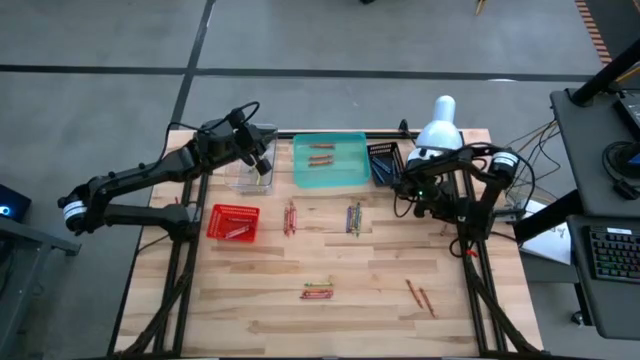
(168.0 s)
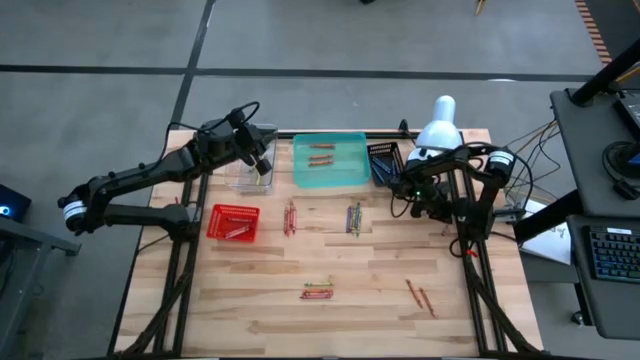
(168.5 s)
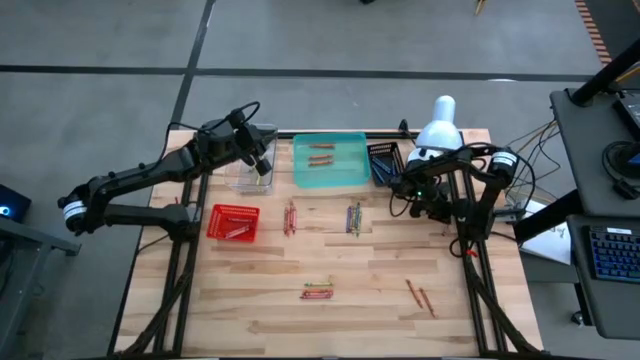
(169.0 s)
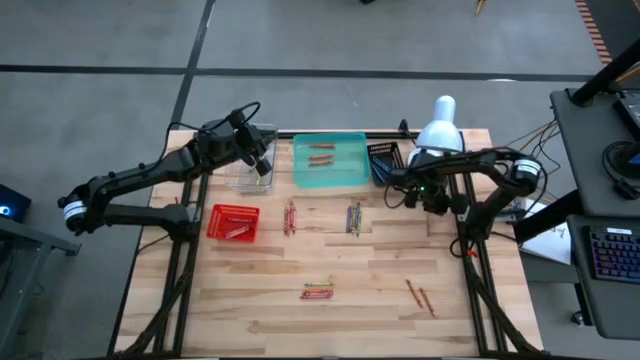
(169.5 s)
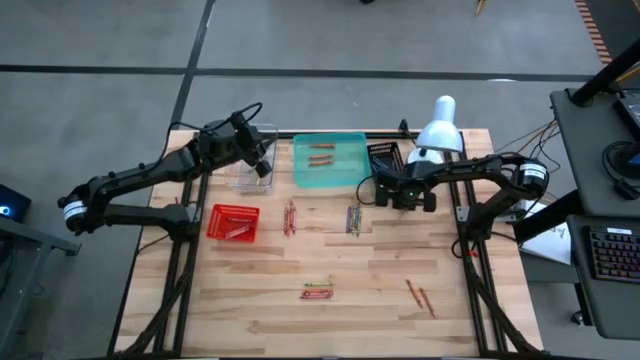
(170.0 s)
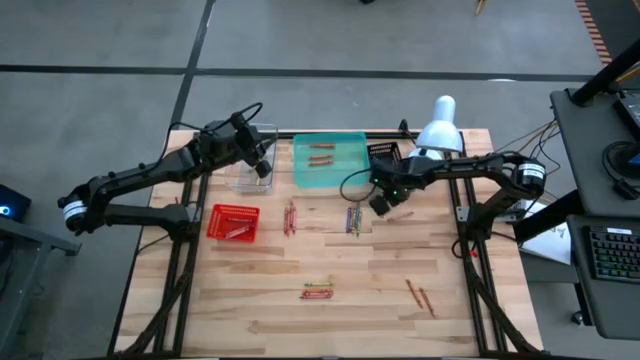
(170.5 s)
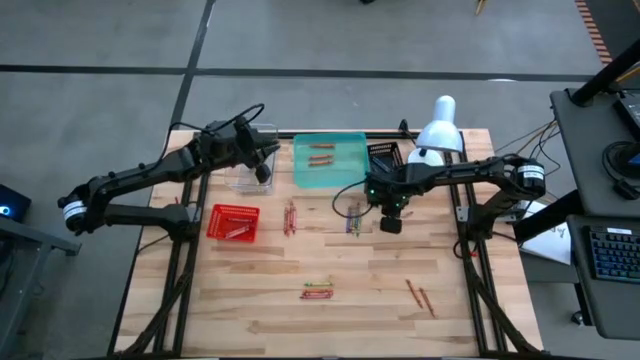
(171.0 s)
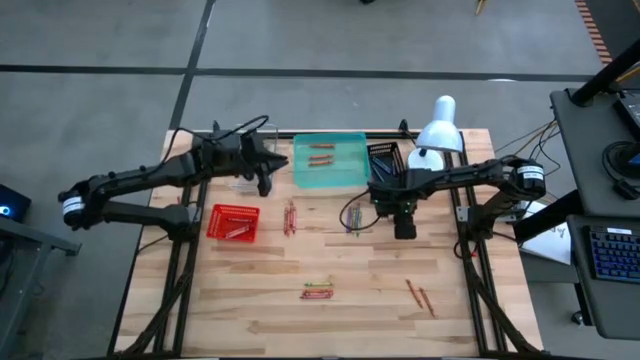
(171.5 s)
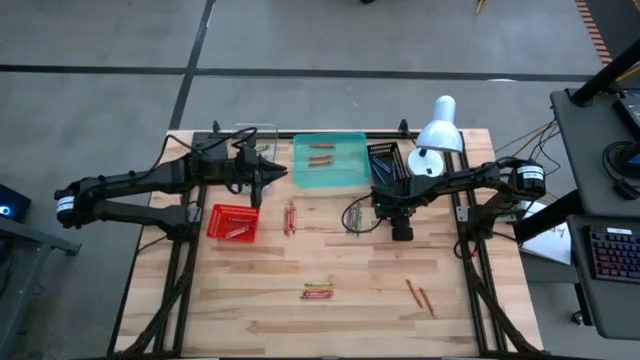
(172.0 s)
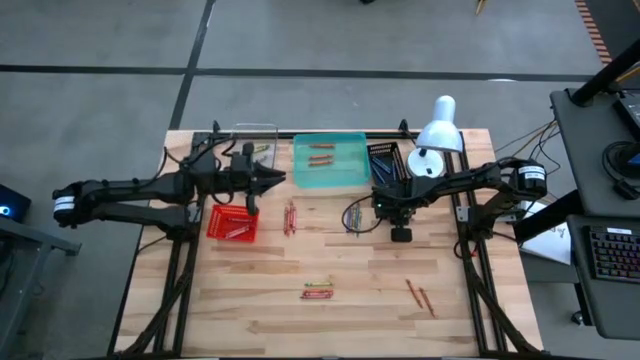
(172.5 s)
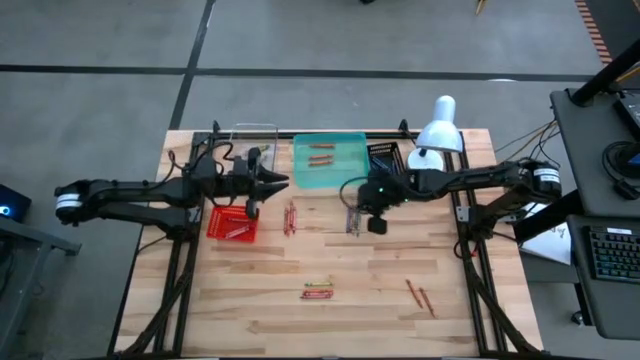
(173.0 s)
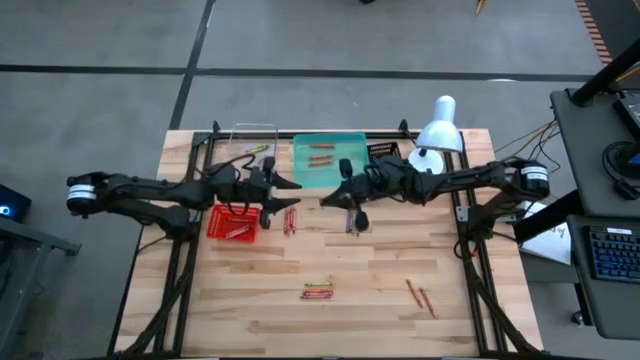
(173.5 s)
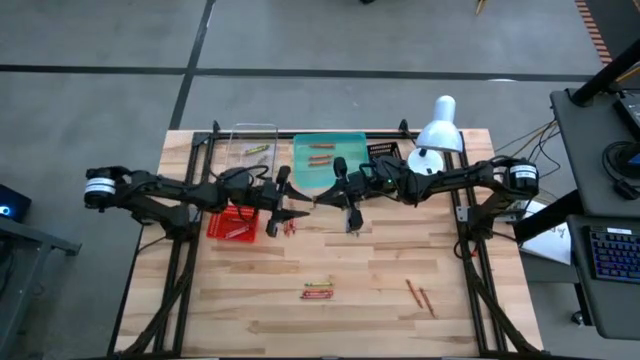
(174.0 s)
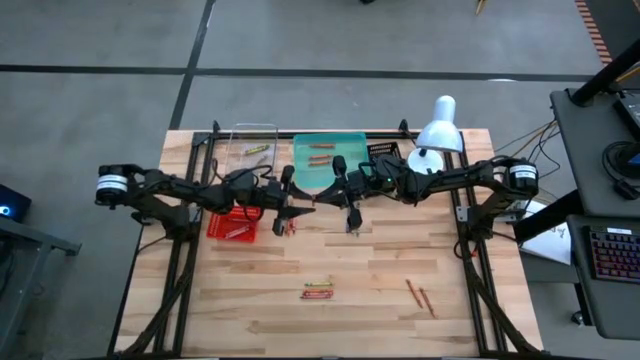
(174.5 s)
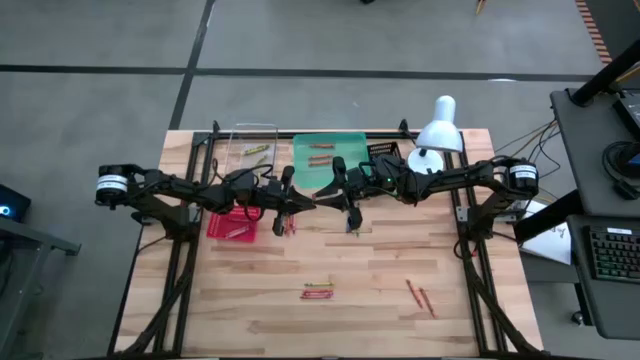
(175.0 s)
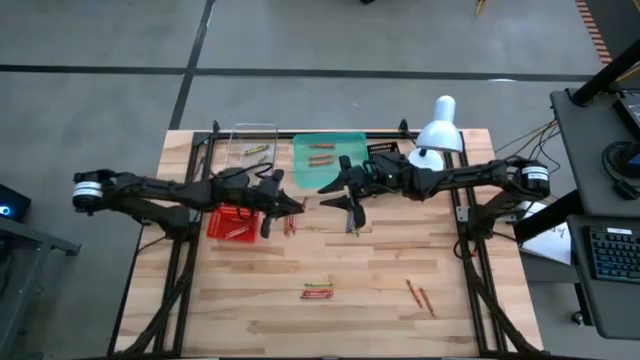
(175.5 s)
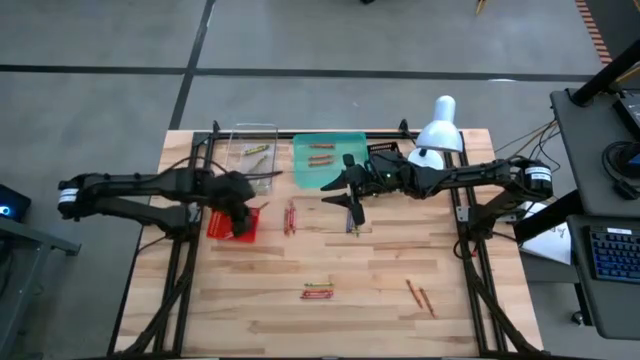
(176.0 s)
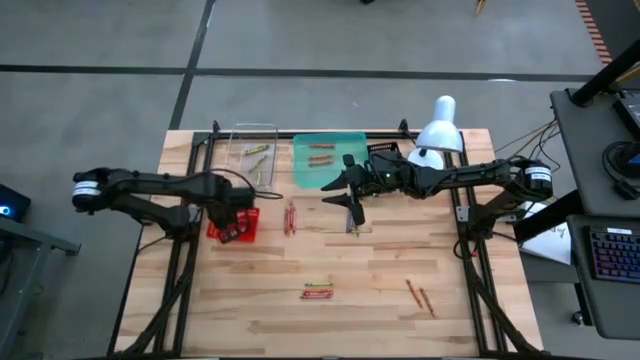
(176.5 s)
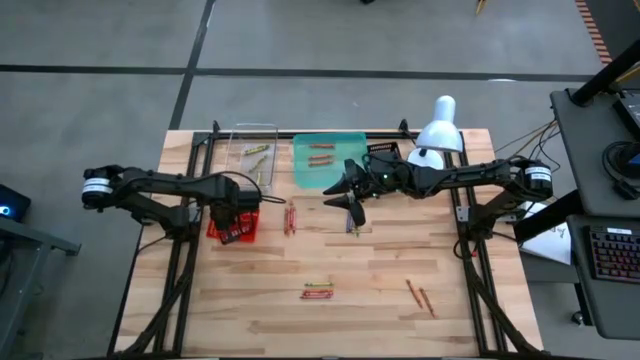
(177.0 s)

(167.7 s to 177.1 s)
Task: Sort crayons
Put the red crayon into the red bin

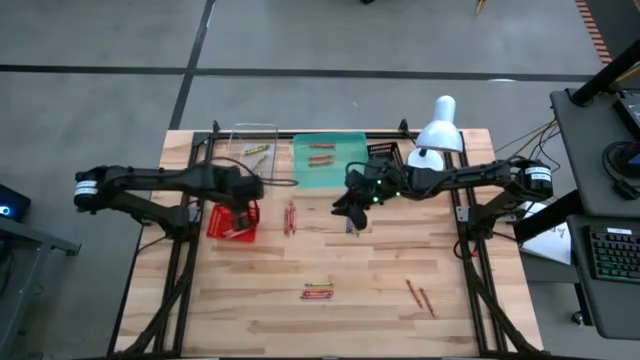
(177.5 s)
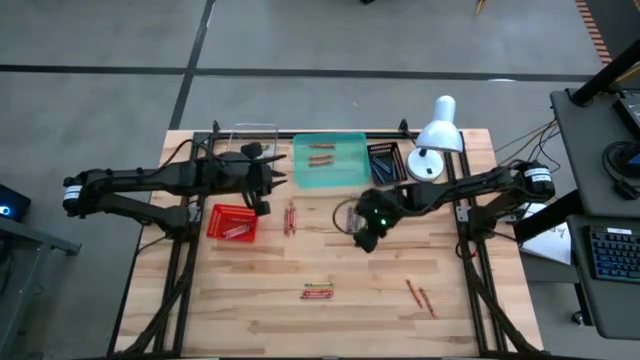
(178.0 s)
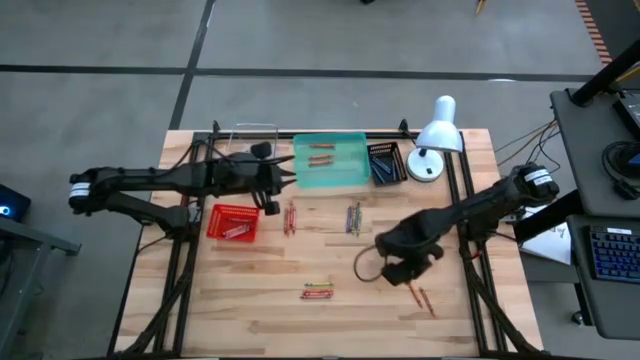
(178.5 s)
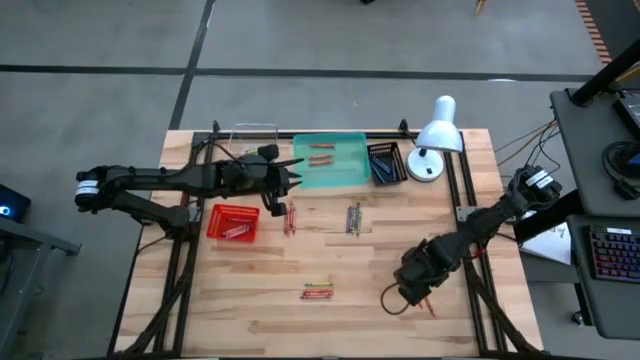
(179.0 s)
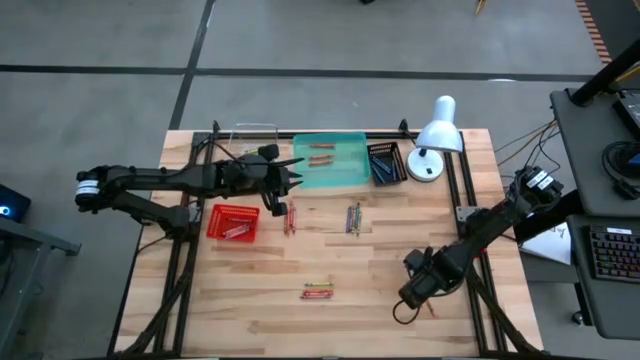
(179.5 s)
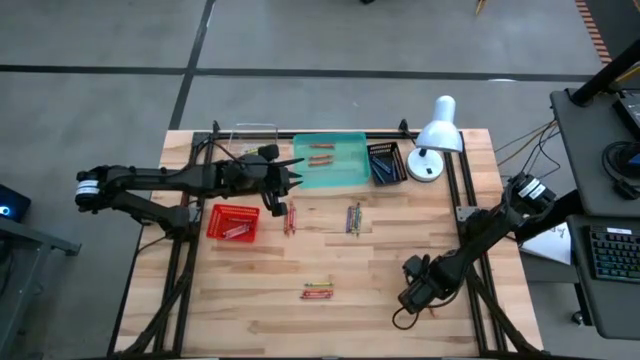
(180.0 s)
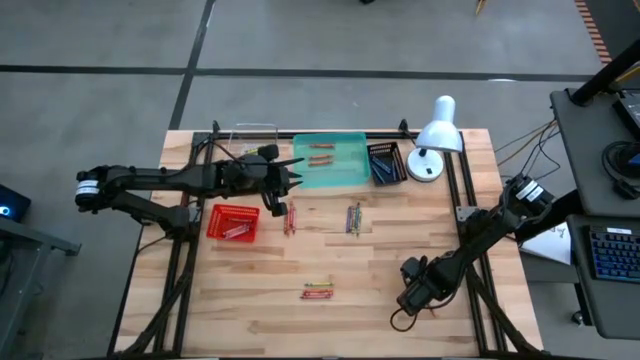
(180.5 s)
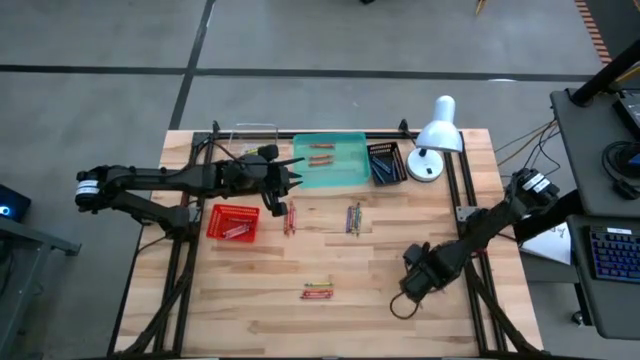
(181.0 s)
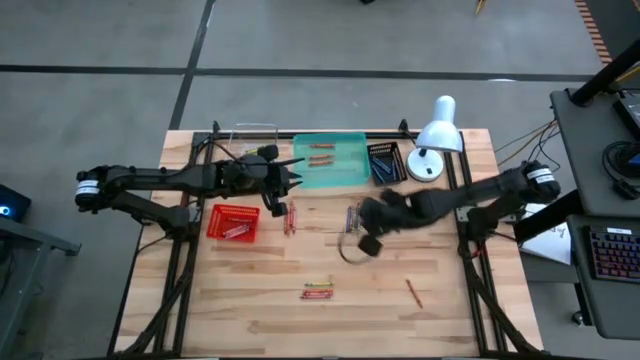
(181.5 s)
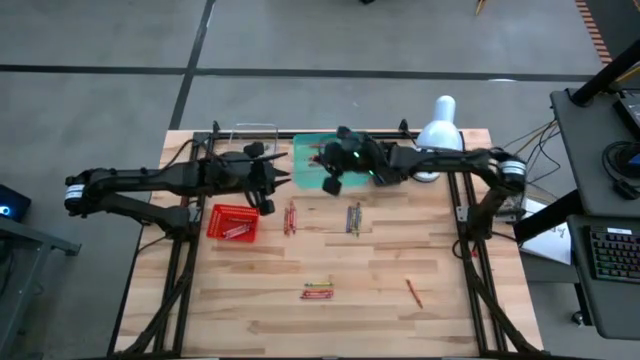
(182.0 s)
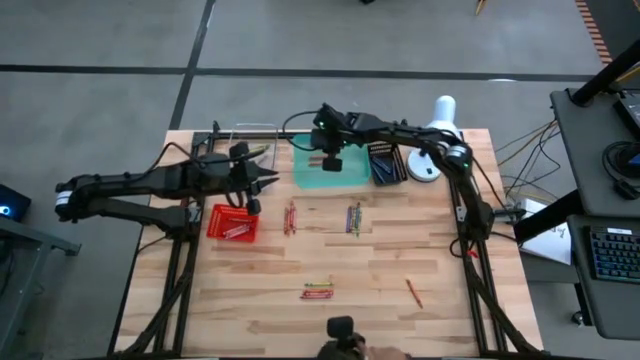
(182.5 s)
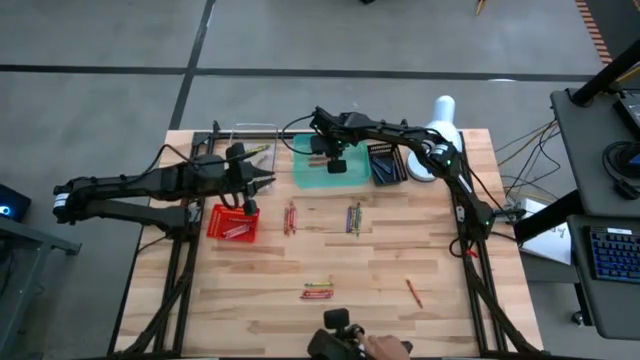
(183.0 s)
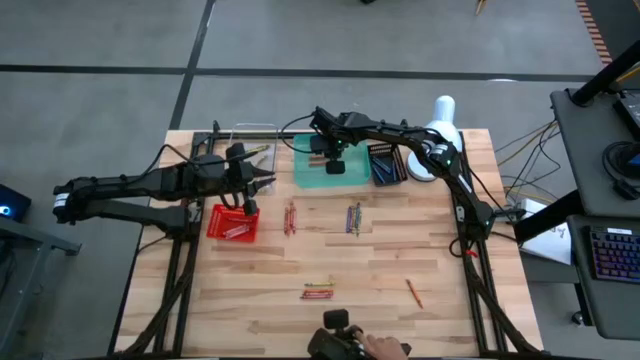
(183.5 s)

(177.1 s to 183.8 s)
Put the orange crayon into the green bin

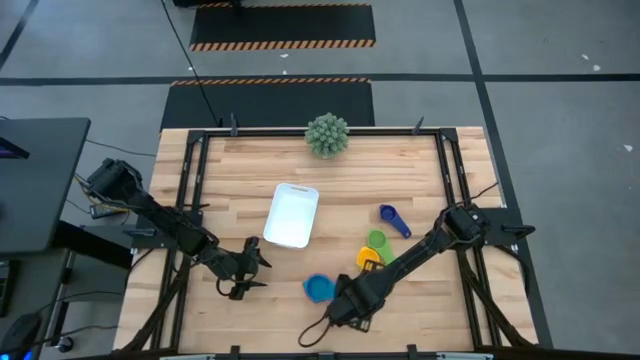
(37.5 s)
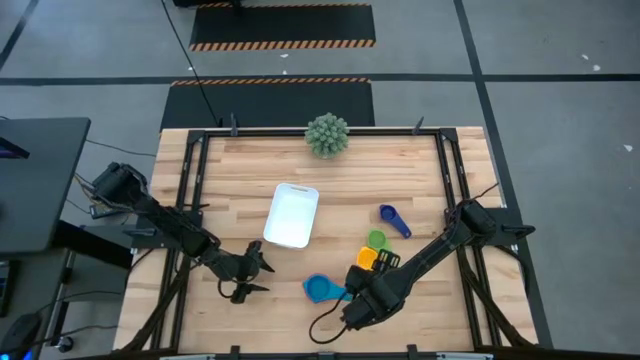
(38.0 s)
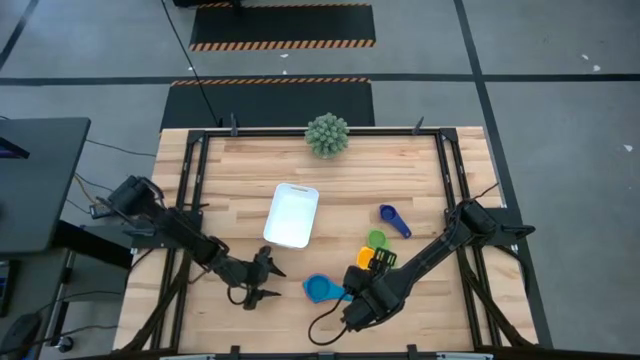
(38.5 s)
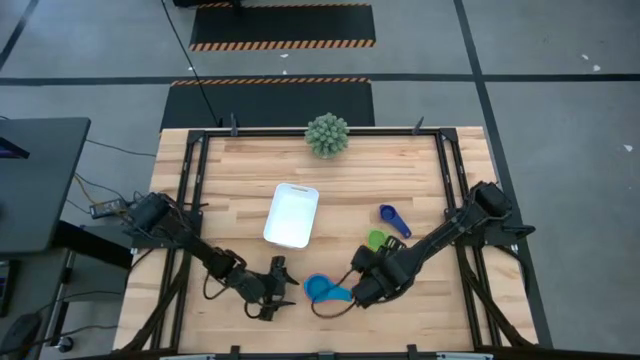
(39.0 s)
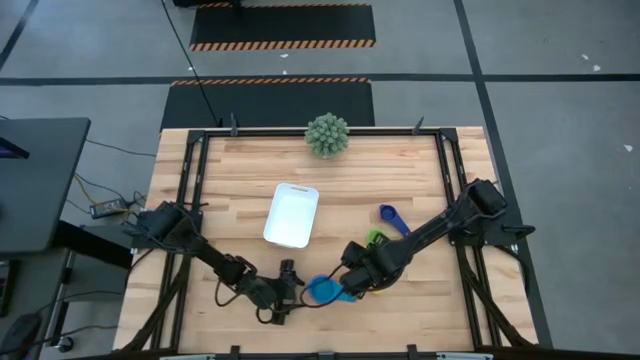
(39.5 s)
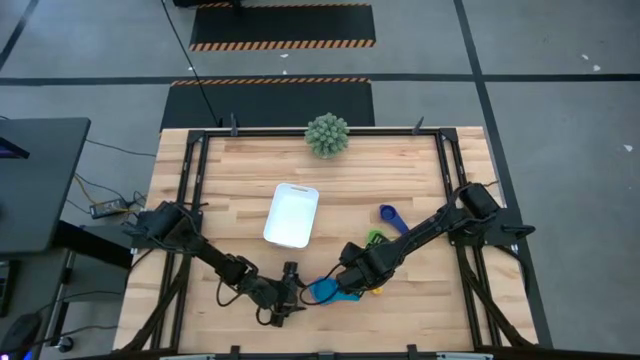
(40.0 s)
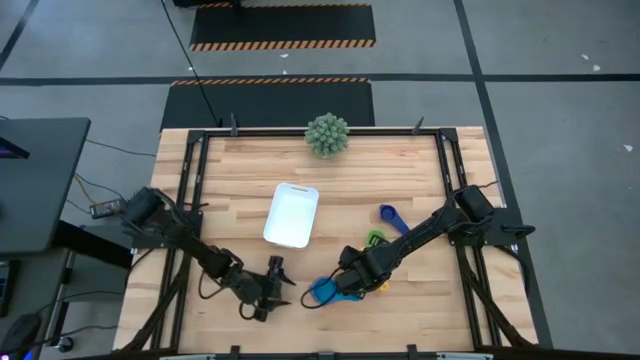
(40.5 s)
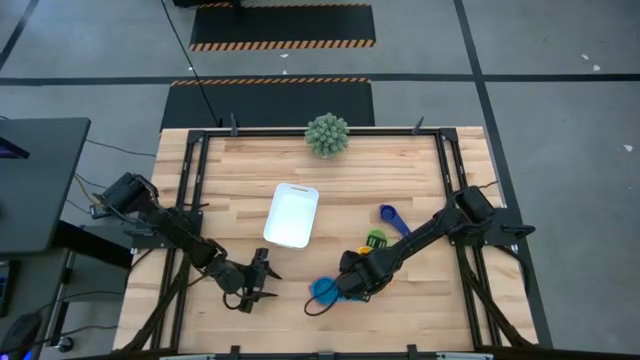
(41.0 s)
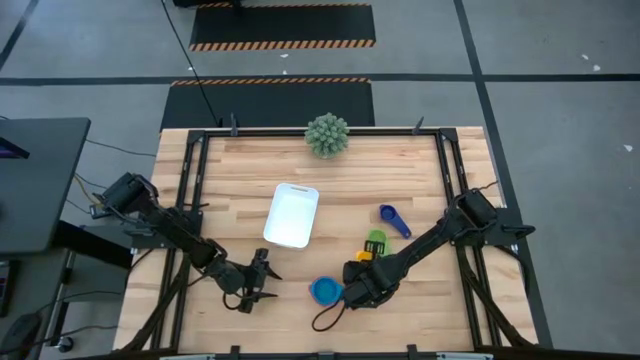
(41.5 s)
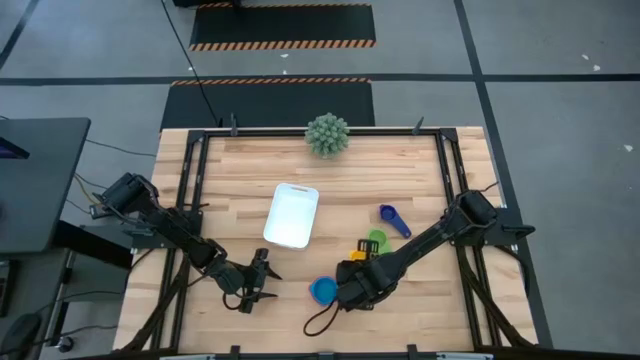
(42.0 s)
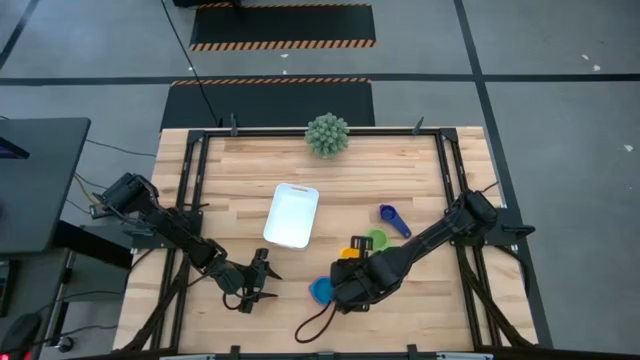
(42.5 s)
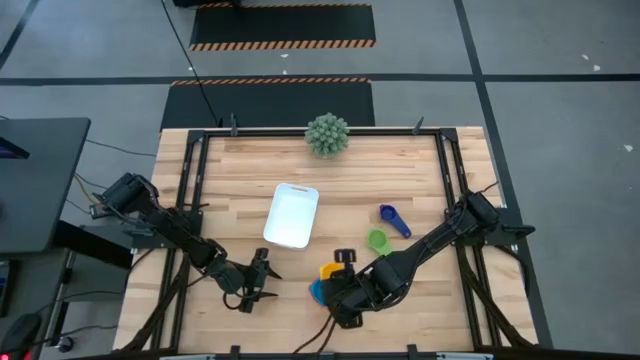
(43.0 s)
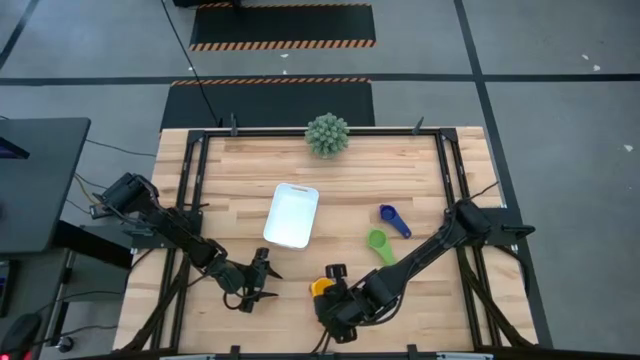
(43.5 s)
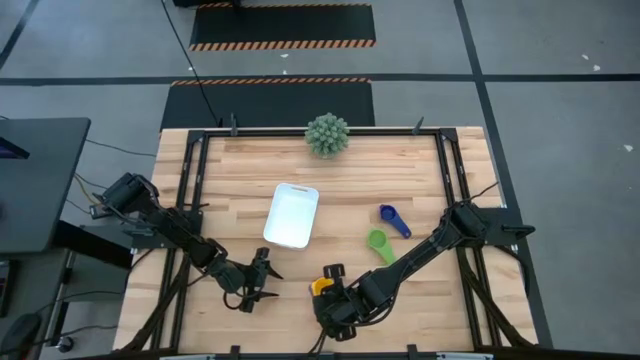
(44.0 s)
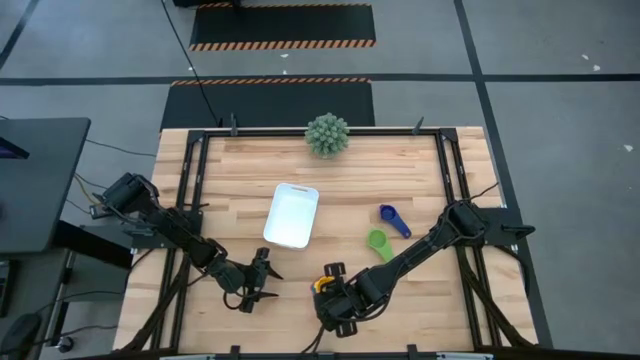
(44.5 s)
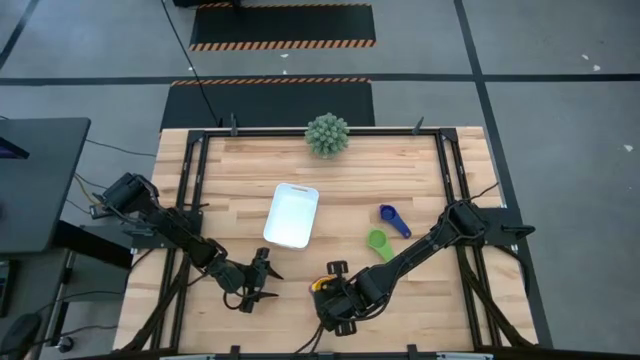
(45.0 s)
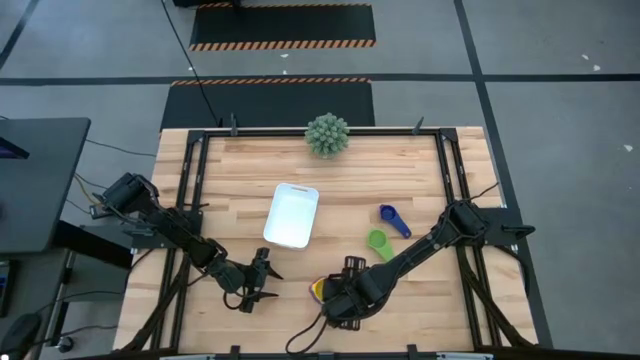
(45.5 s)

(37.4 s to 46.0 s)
Task: Nest measuring cups in basket
Stack the yellow measuring cup on the top of the light blue measuring cup
